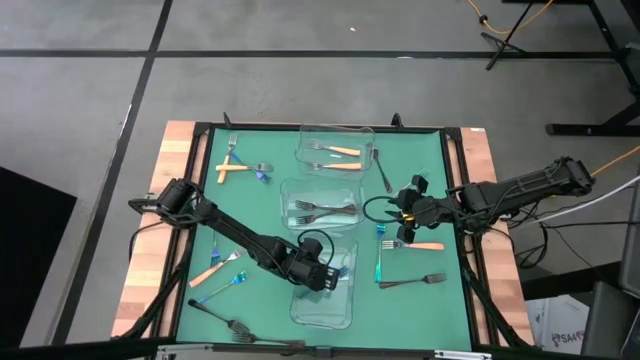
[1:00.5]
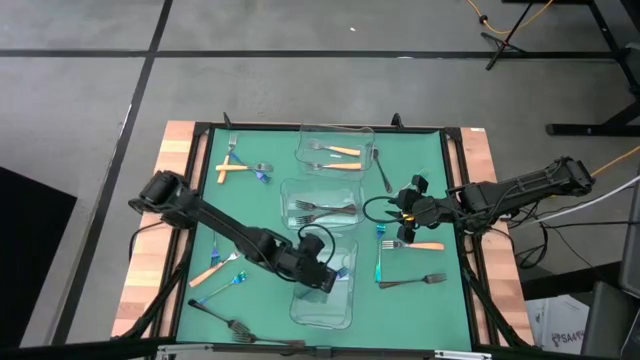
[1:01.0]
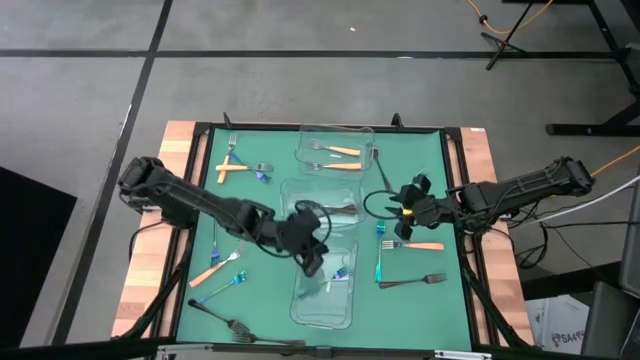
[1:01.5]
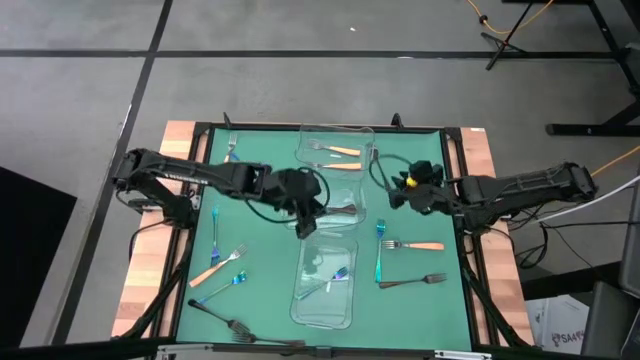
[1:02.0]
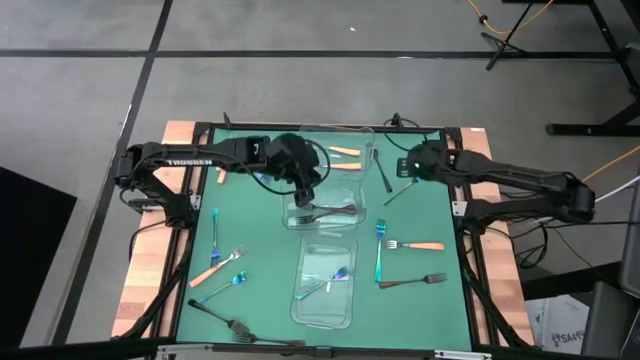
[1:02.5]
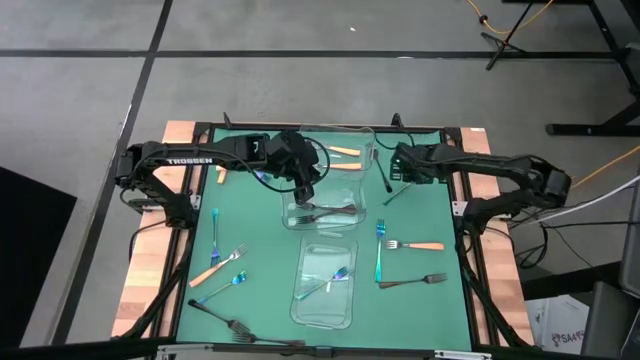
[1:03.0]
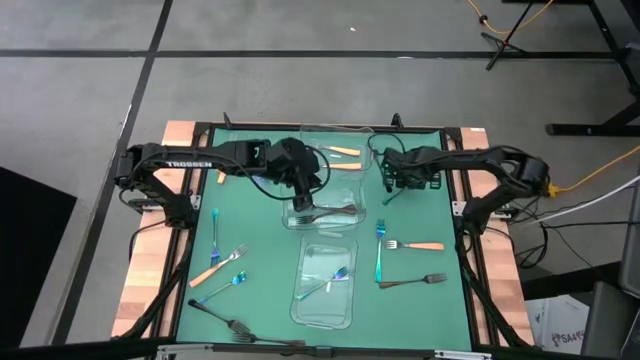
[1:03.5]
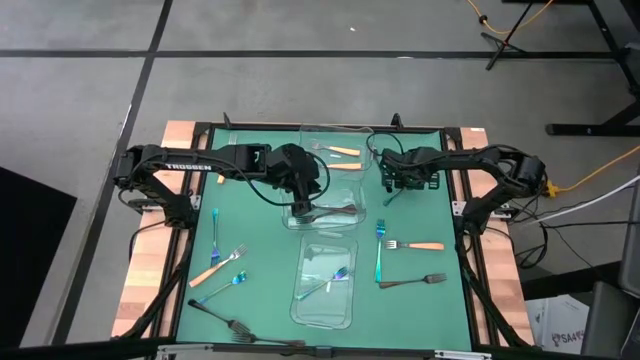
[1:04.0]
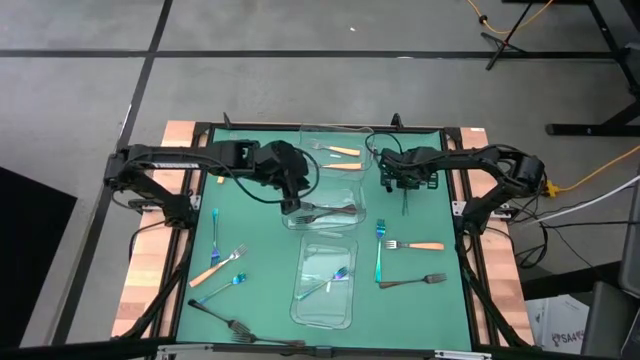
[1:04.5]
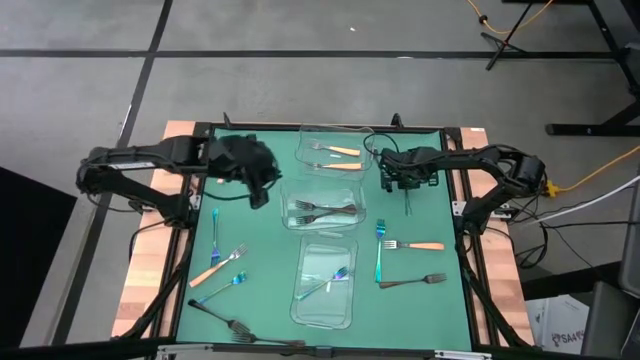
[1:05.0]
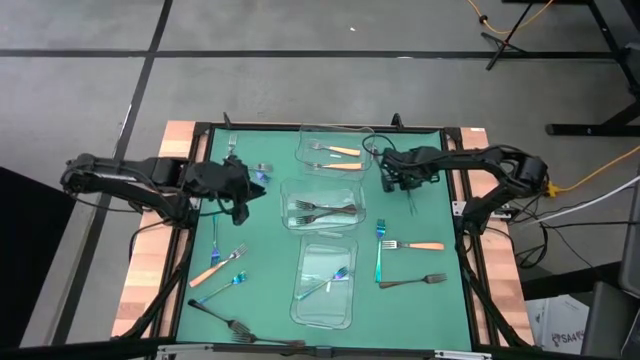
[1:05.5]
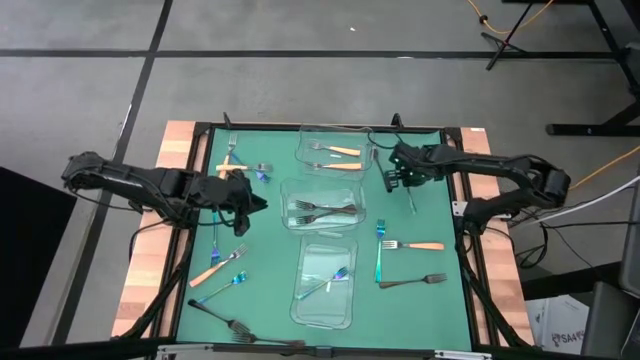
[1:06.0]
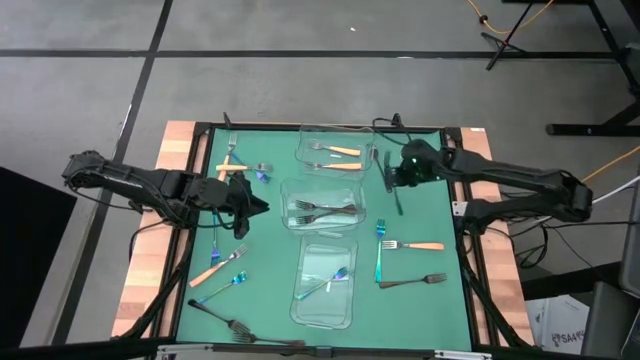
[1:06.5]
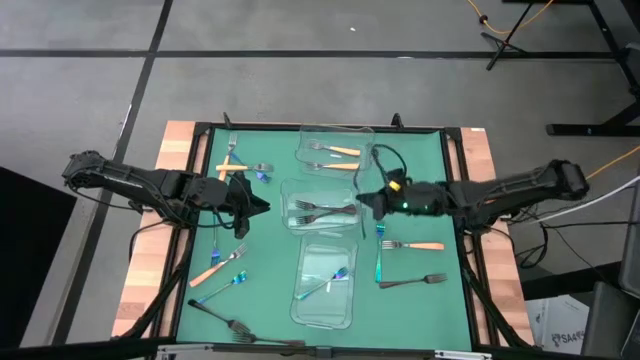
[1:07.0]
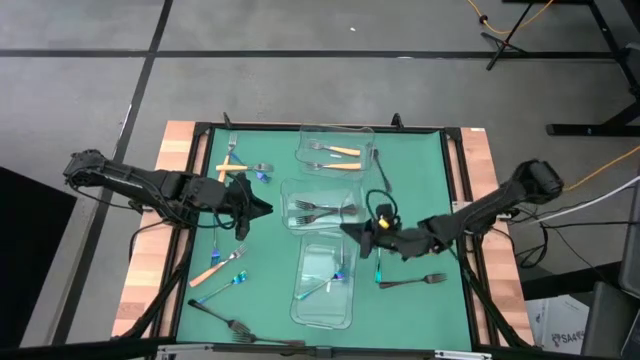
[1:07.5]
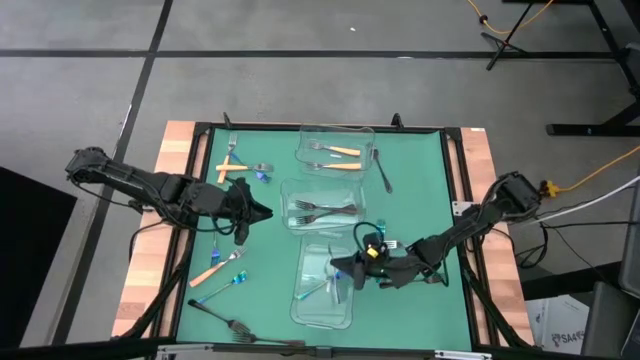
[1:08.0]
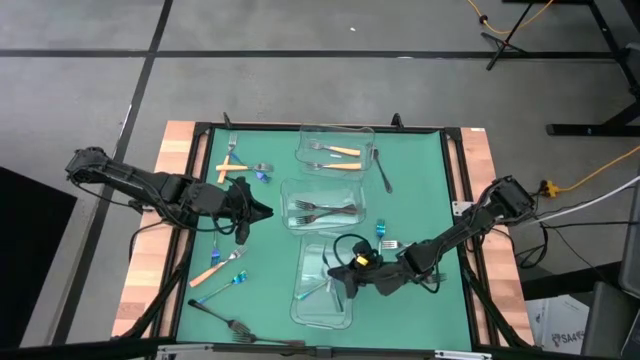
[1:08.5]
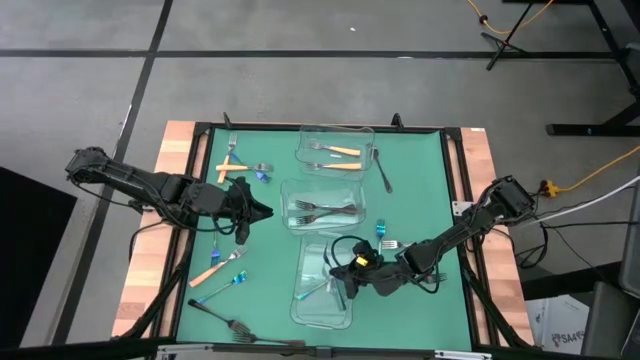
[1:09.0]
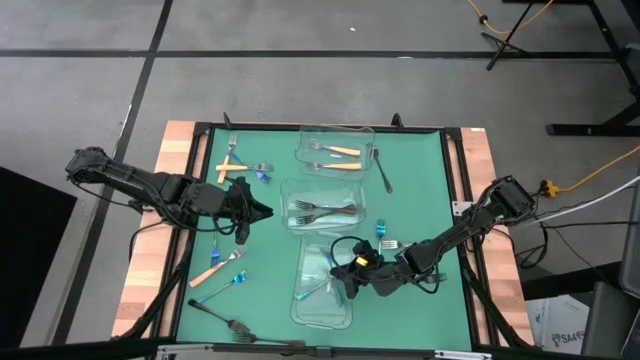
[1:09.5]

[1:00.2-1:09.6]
Task: Sort silverware by color (type)
Put the blue fork into the bottom transparent bin

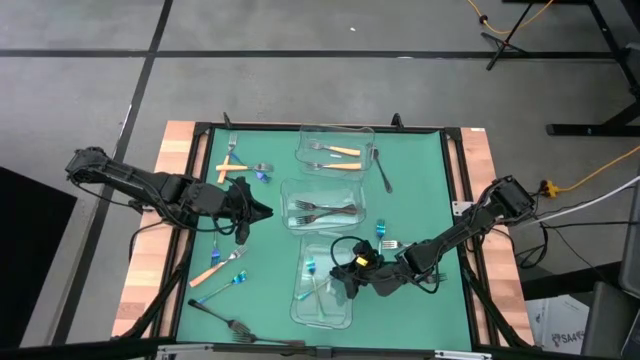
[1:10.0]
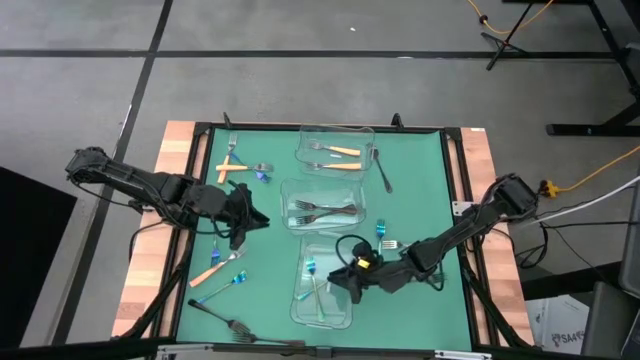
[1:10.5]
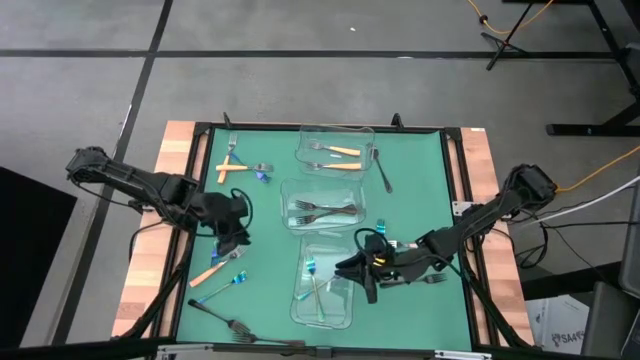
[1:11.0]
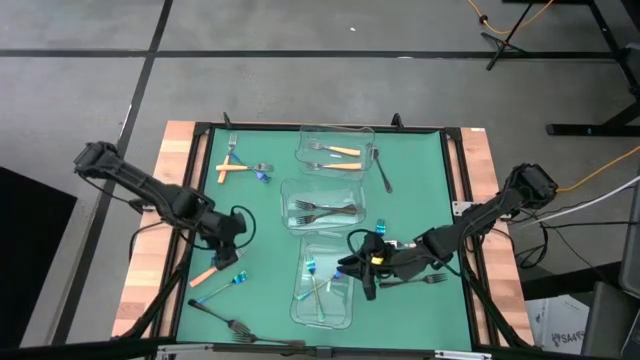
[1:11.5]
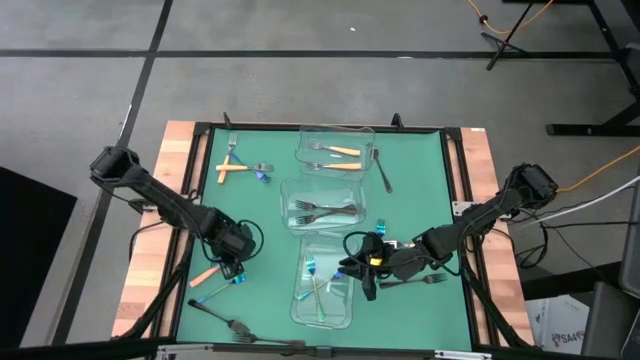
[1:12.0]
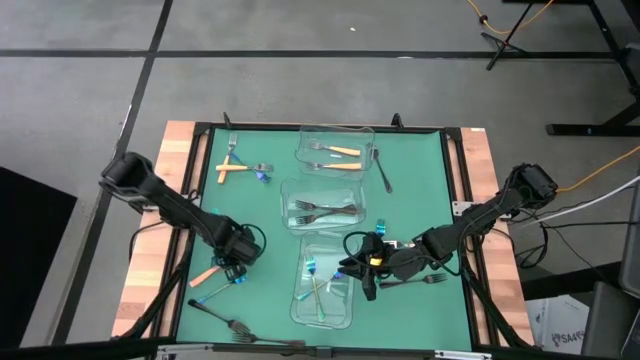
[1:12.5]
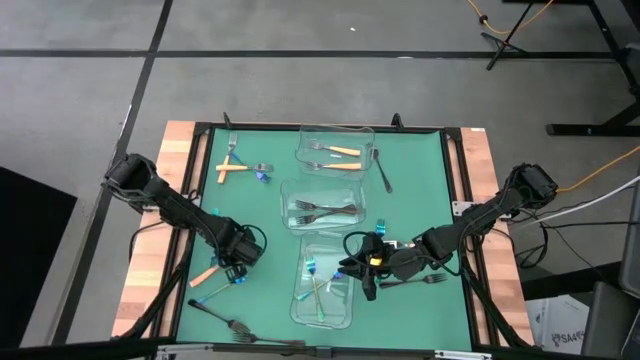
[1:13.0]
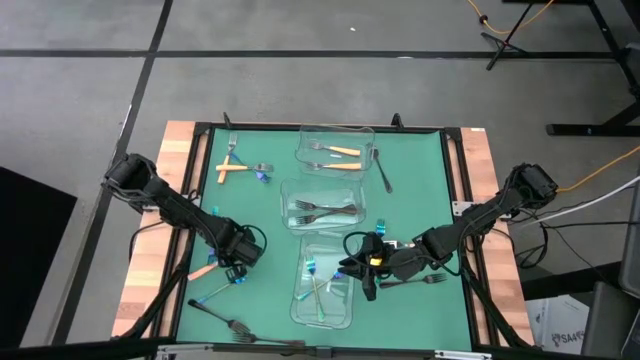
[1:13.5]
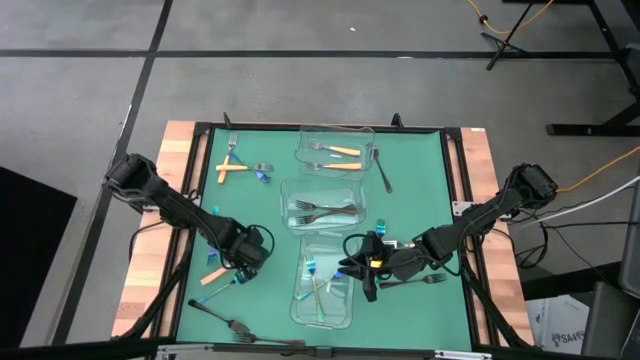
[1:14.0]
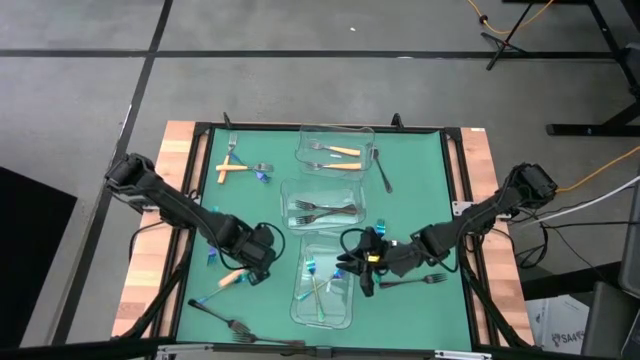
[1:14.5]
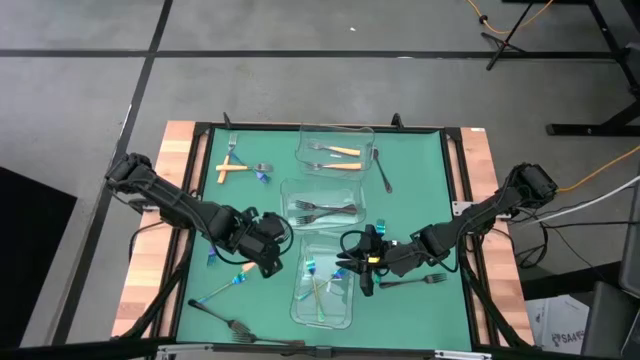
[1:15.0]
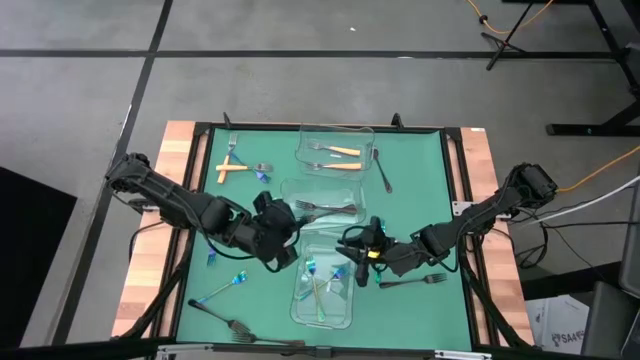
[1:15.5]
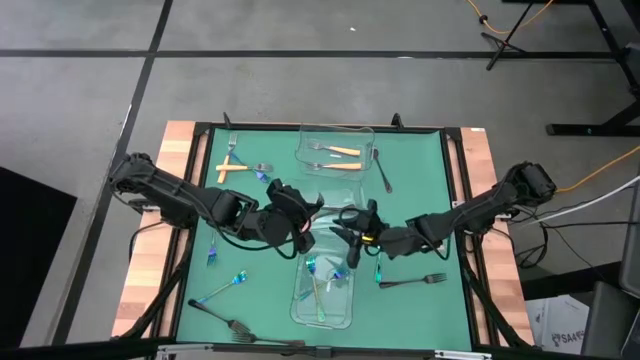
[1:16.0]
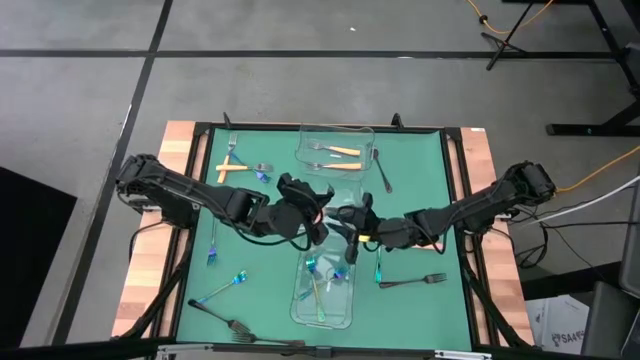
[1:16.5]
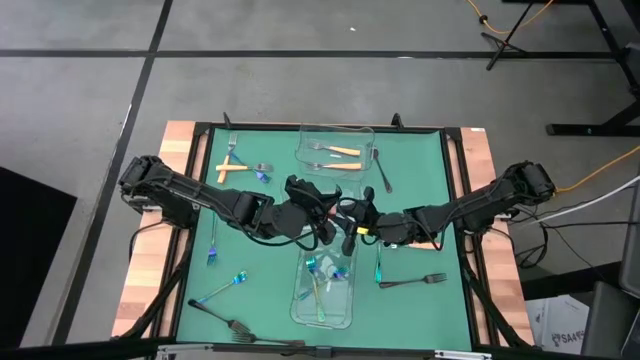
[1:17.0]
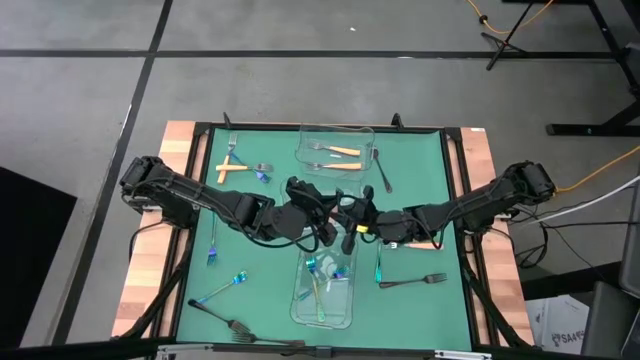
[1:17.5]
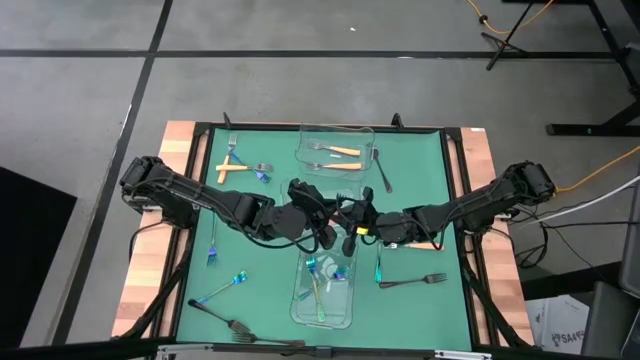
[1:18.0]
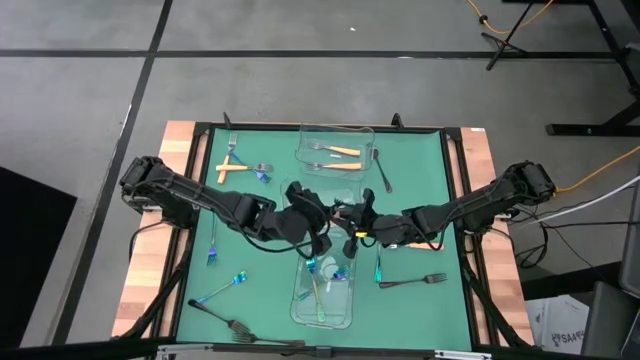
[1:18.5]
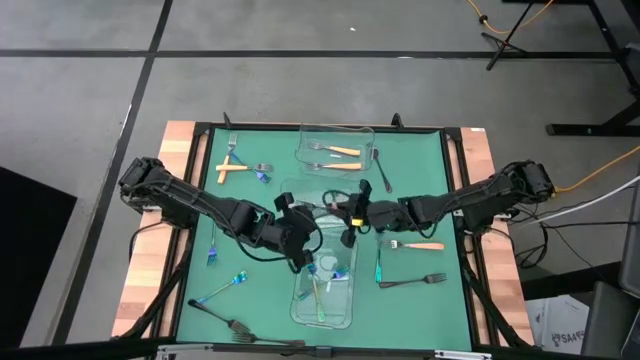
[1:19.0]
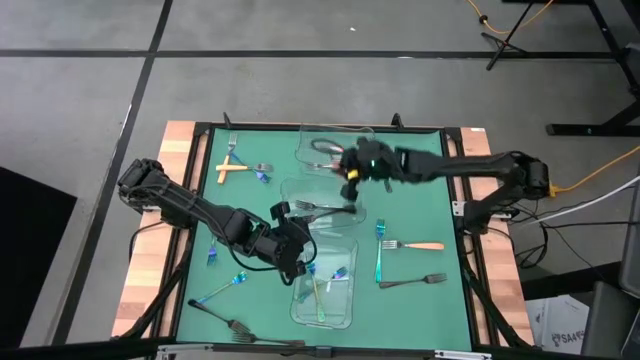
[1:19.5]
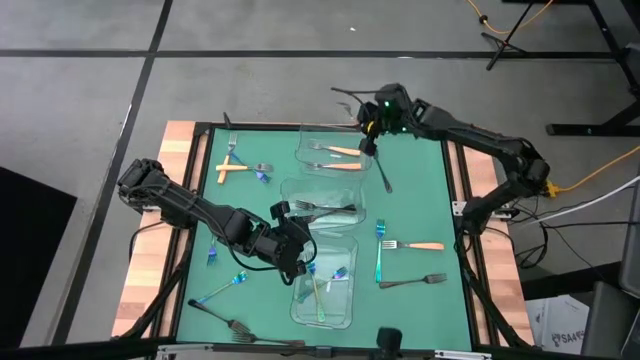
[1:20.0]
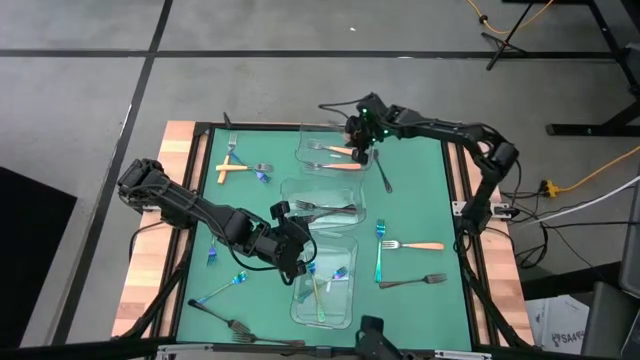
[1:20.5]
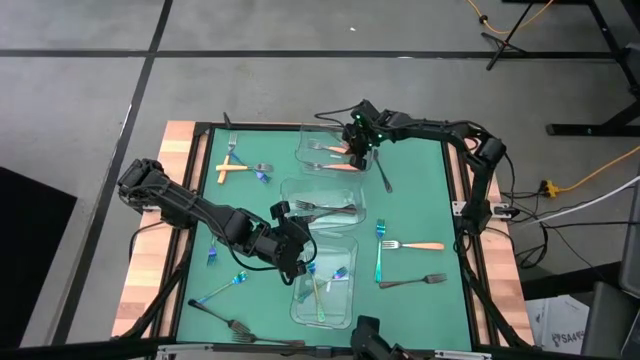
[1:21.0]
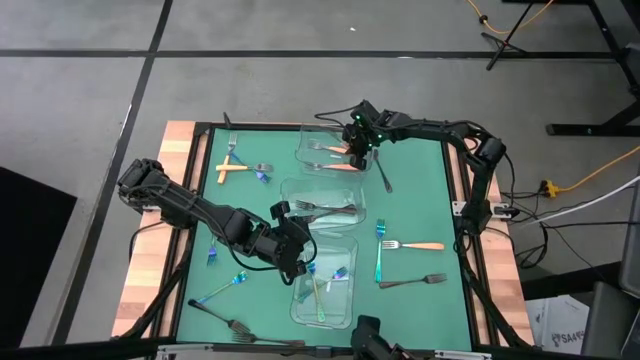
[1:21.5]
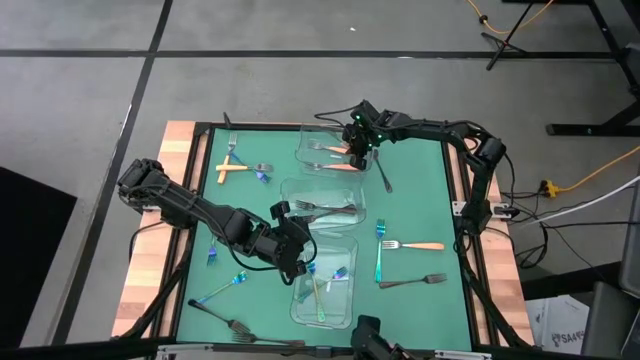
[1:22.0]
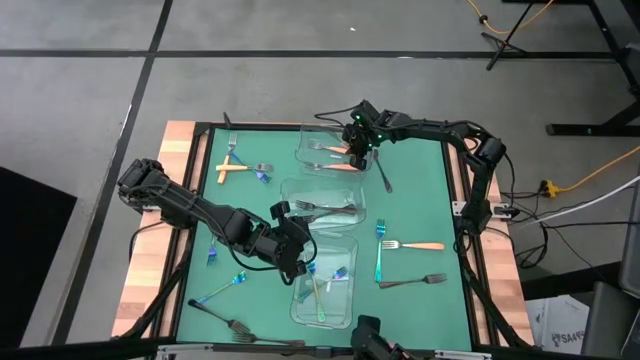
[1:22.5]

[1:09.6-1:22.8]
Put the yellow fork into the top transparent bin
